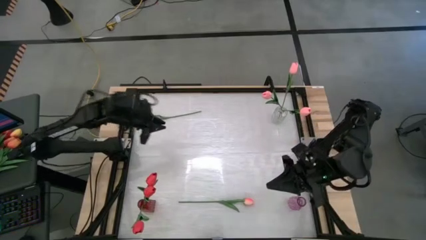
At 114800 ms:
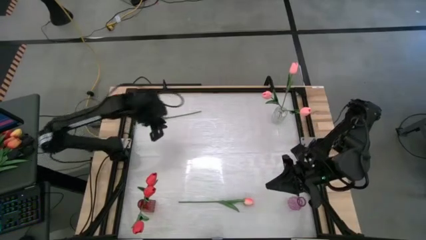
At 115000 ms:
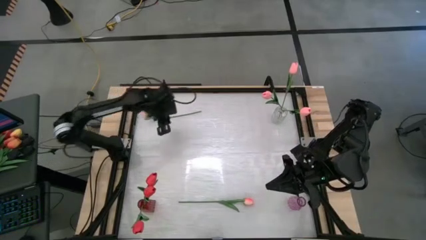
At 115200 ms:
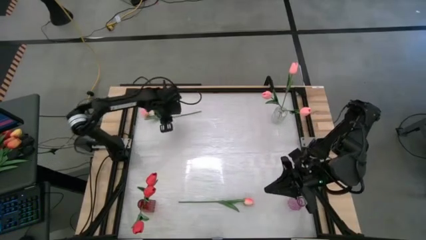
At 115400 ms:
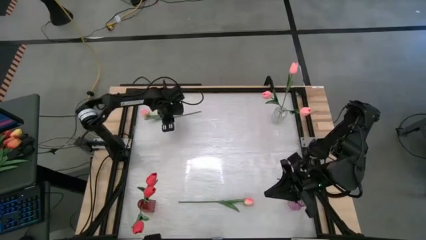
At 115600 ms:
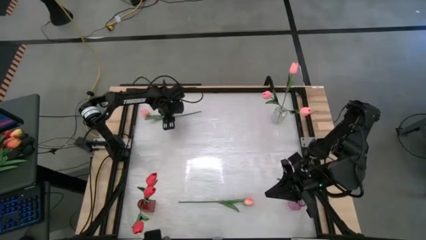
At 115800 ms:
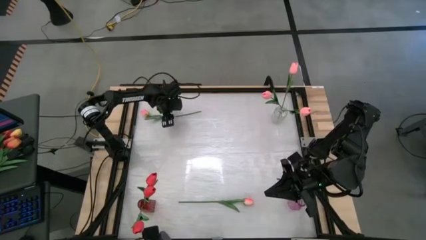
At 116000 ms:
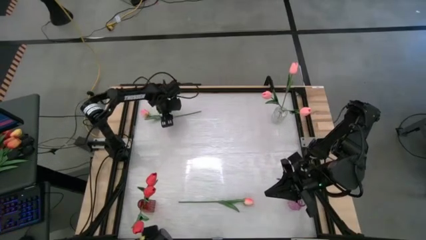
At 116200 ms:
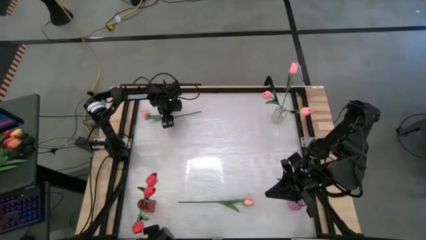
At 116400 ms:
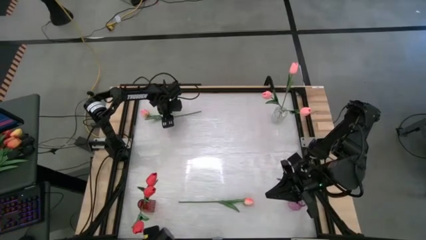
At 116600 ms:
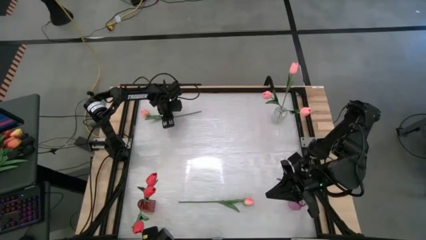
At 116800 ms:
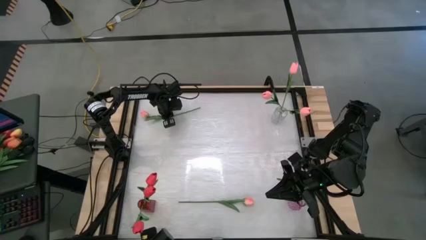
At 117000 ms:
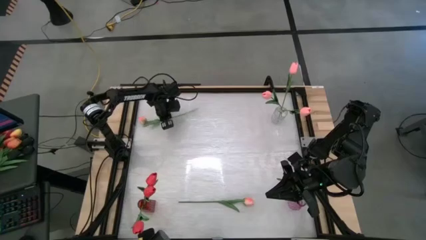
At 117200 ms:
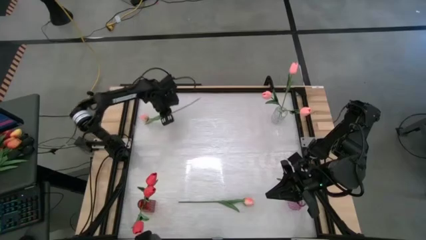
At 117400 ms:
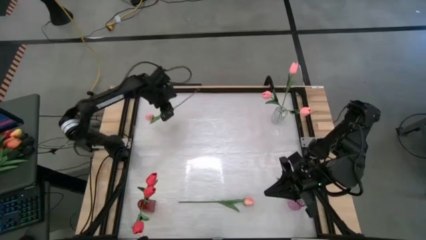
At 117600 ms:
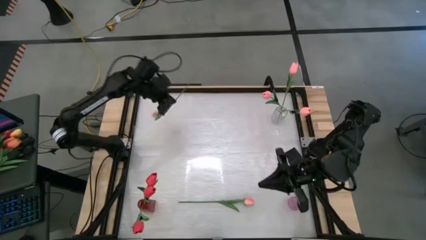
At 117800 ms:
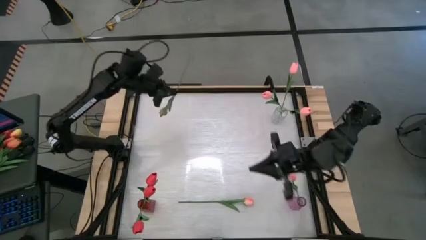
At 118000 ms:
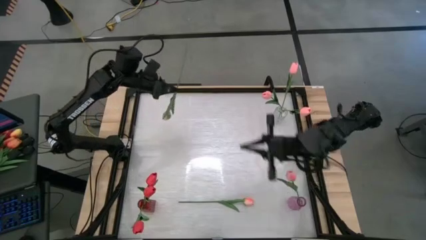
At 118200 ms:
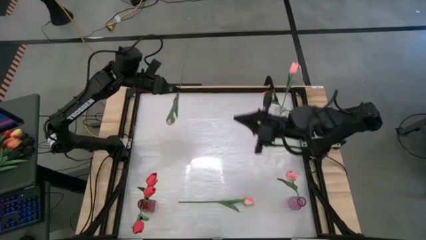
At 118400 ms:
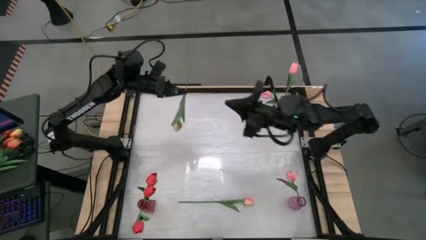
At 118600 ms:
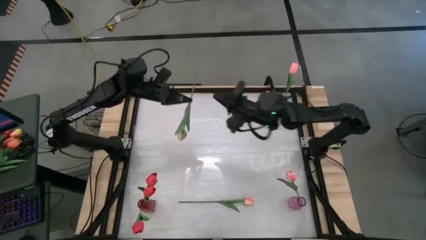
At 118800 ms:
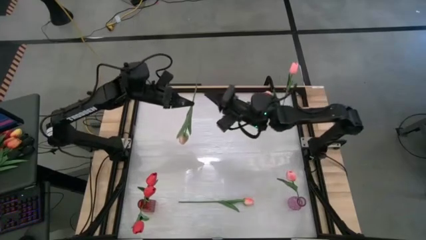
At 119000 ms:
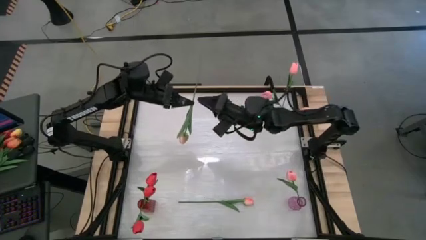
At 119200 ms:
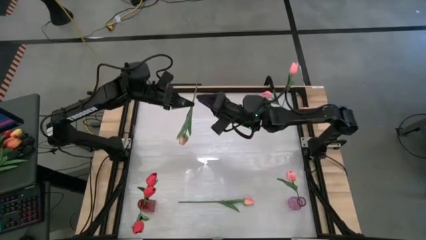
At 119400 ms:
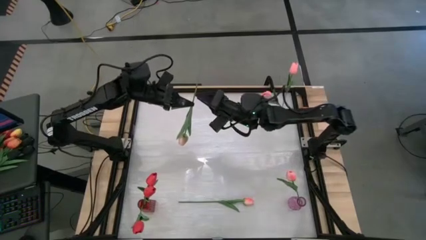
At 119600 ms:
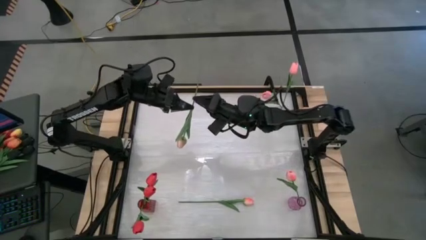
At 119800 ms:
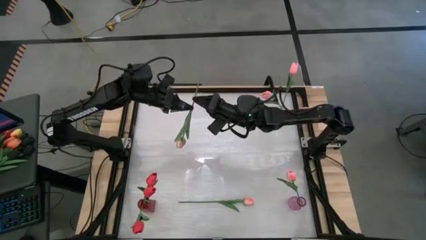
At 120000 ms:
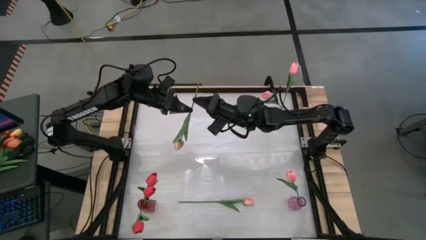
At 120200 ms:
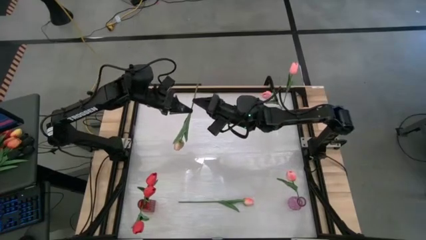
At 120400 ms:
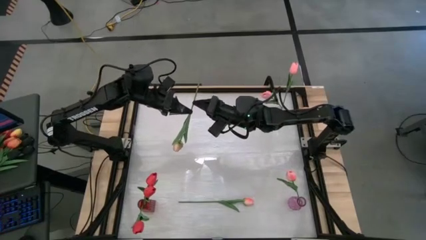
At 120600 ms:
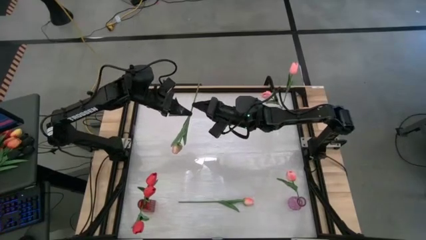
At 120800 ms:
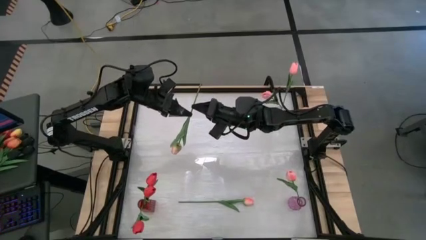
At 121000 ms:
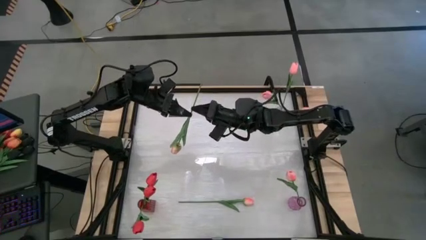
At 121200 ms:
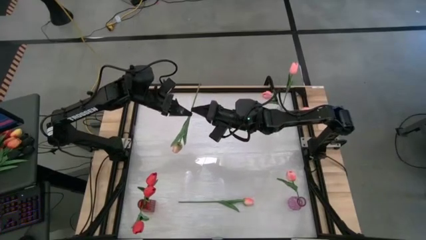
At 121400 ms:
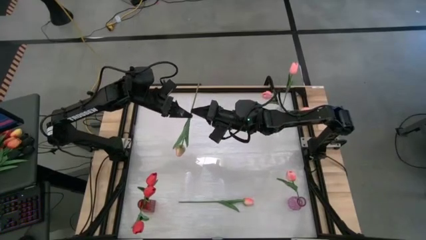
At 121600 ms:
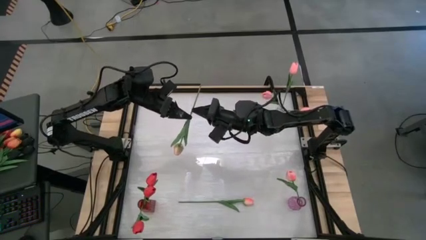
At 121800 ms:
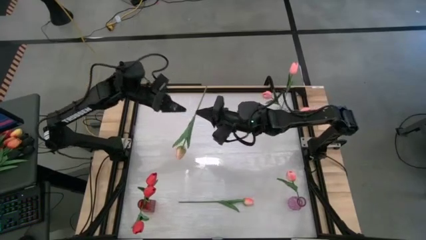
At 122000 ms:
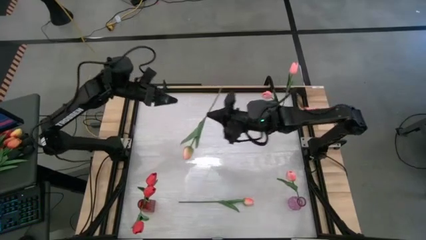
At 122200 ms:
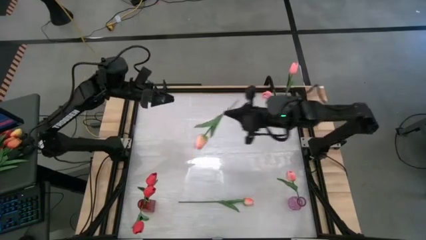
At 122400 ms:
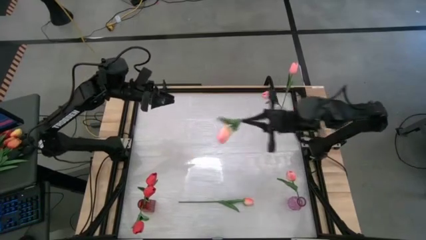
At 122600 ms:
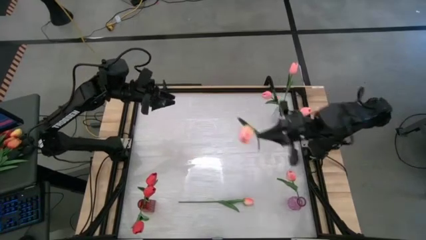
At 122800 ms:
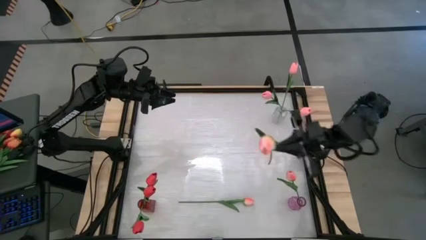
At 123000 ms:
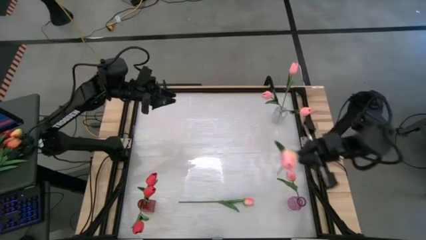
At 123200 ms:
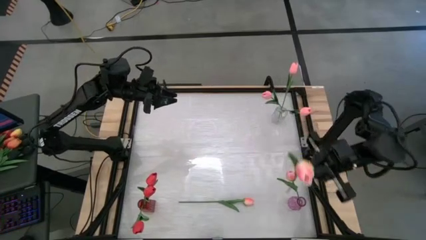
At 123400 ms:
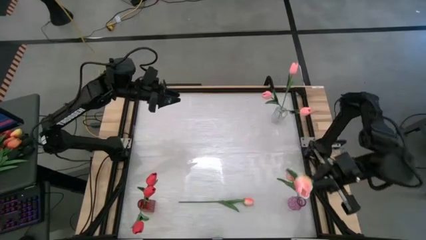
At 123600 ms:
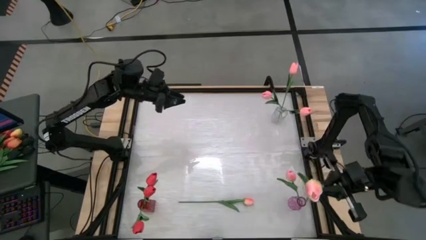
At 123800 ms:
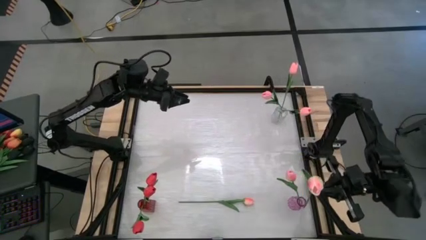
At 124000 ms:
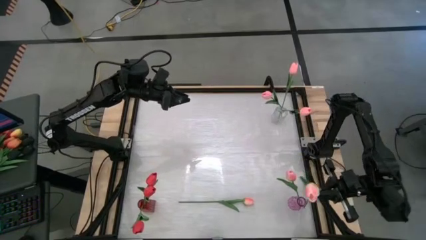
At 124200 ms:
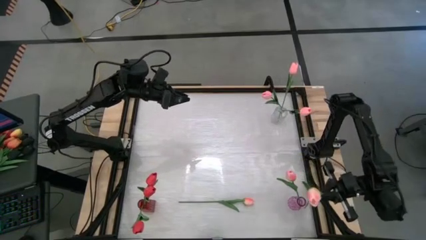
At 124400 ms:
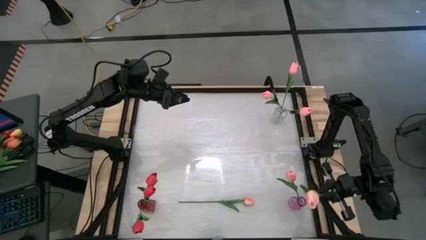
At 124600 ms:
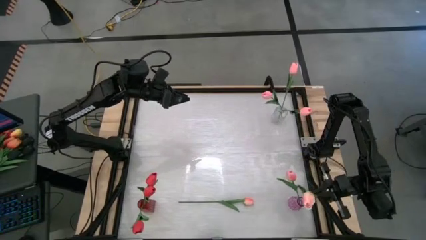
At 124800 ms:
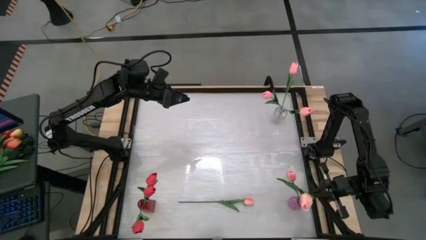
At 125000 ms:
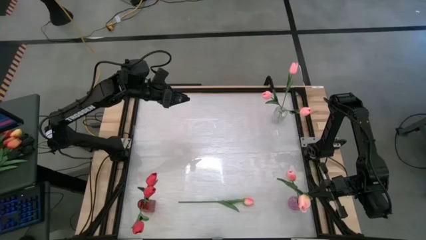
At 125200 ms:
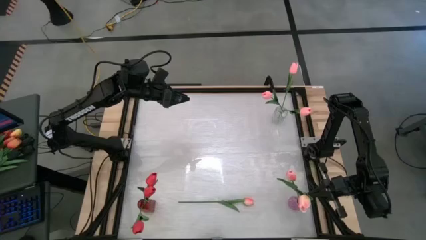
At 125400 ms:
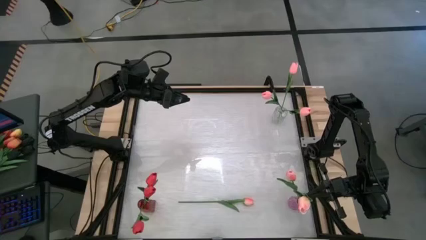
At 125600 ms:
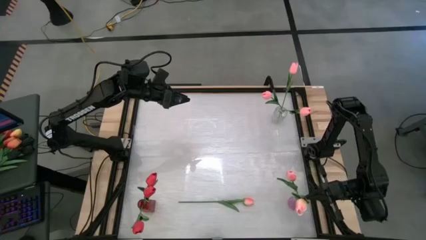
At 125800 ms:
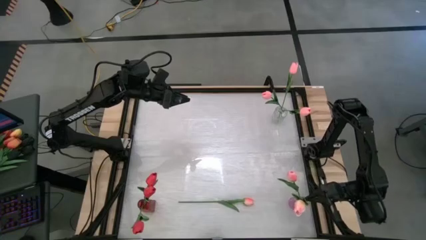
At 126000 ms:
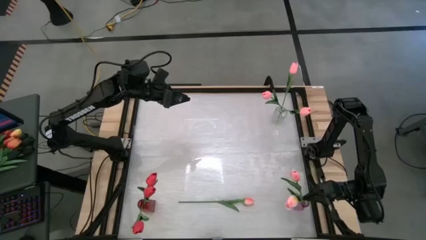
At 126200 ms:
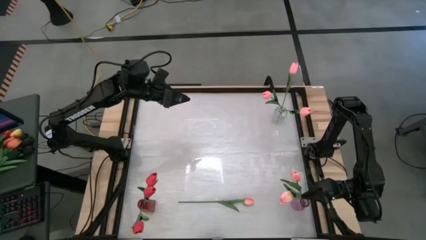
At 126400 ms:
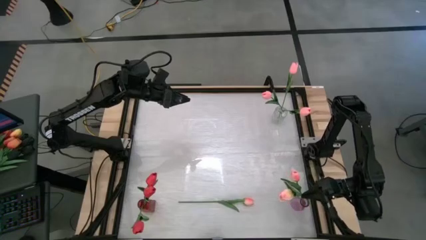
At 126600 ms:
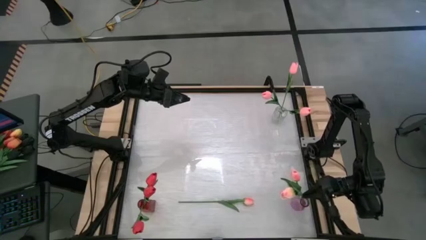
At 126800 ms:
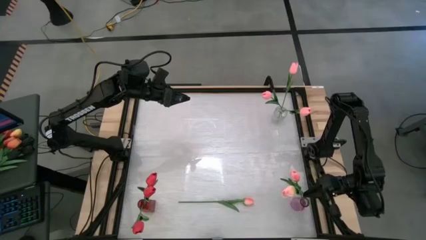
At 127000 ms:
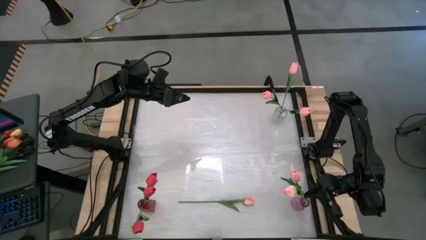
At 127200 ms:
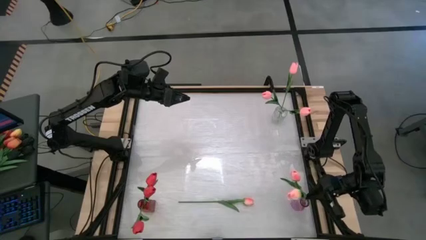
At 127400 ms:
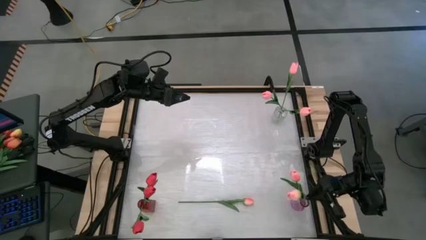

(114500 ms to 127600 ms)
Task: Sort flowers into vase by color
Put the pink flower in the pink vase
